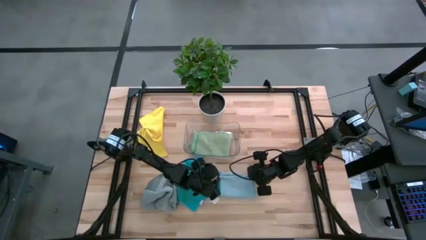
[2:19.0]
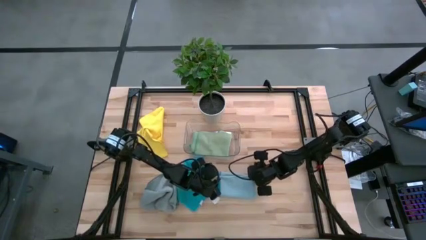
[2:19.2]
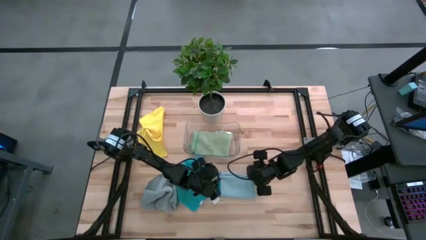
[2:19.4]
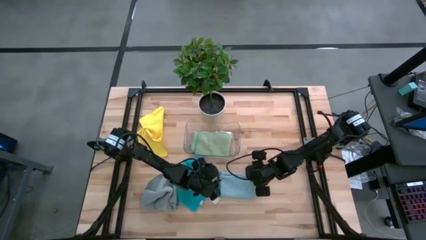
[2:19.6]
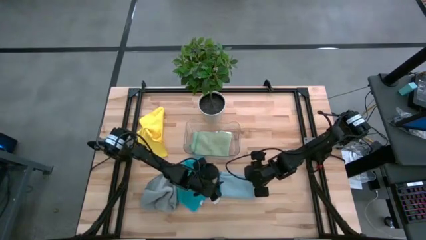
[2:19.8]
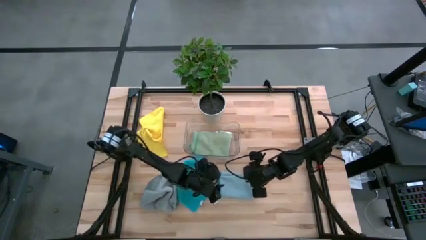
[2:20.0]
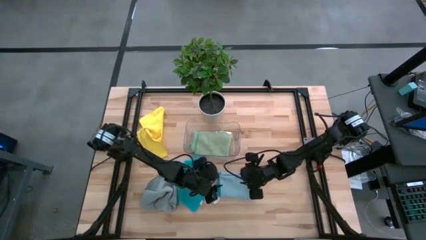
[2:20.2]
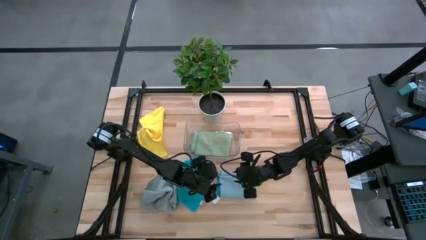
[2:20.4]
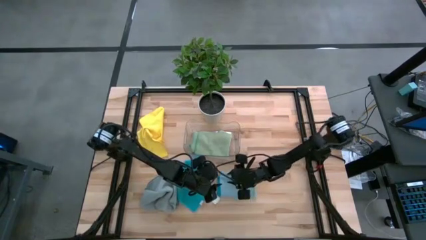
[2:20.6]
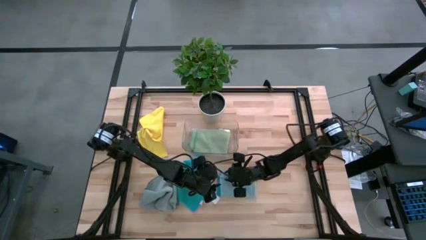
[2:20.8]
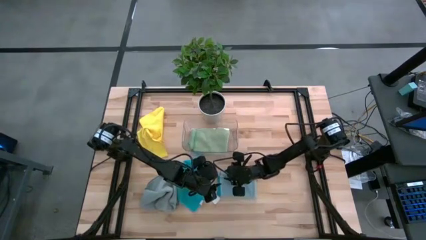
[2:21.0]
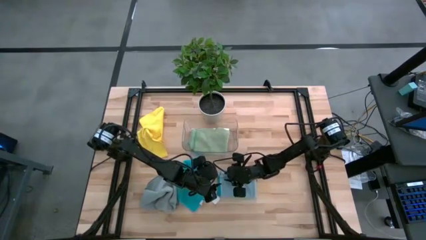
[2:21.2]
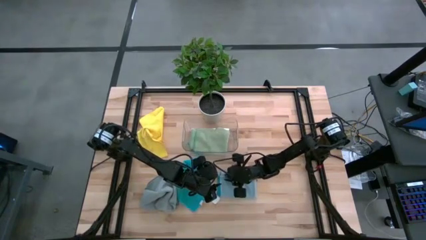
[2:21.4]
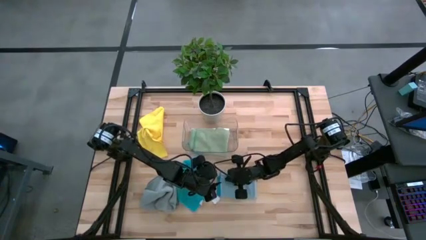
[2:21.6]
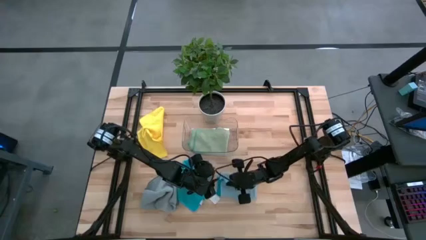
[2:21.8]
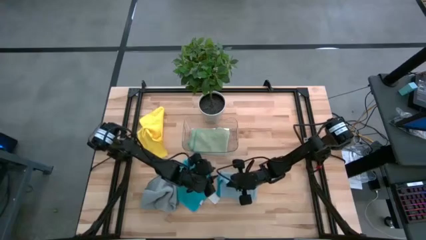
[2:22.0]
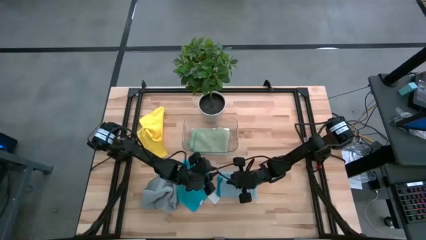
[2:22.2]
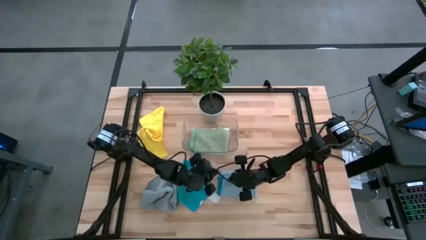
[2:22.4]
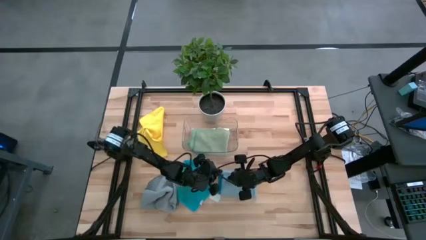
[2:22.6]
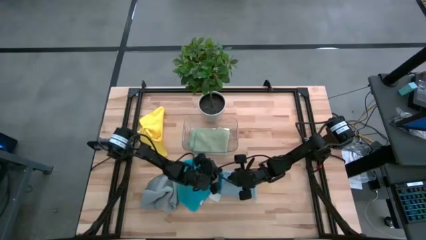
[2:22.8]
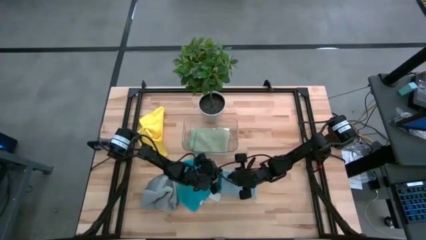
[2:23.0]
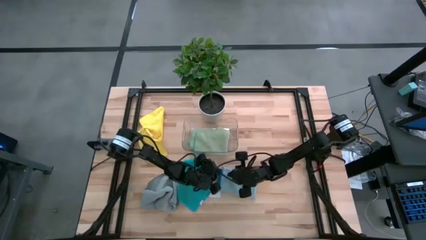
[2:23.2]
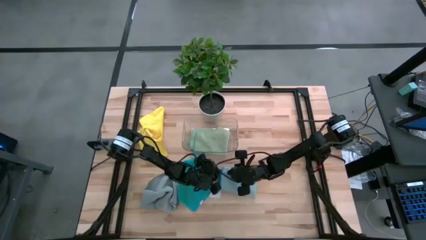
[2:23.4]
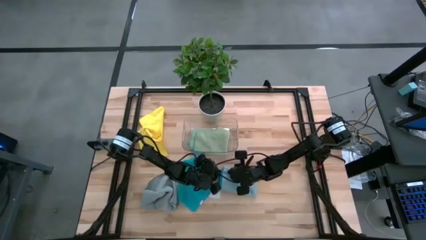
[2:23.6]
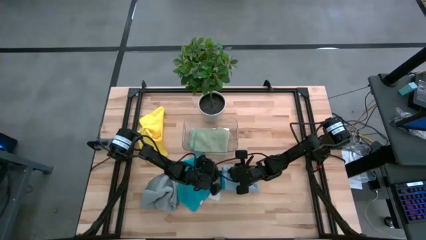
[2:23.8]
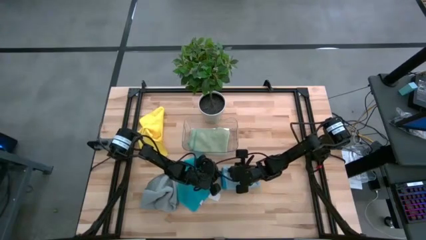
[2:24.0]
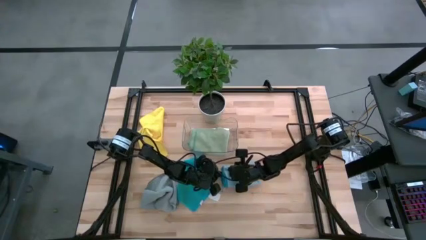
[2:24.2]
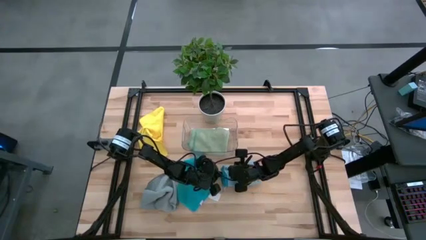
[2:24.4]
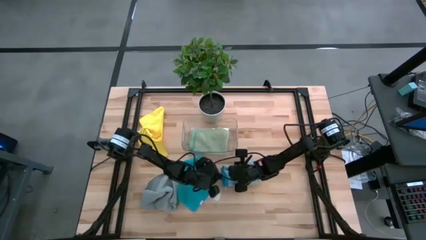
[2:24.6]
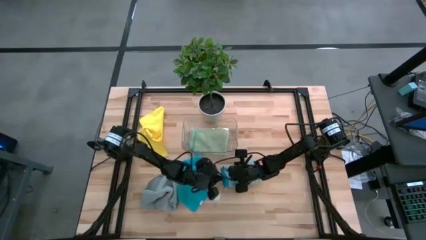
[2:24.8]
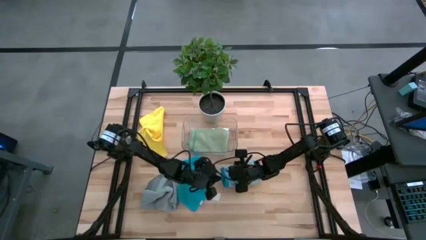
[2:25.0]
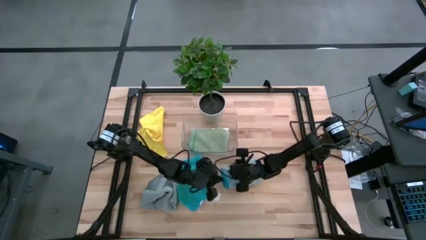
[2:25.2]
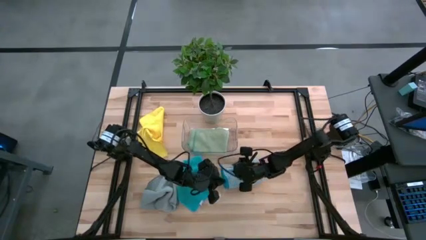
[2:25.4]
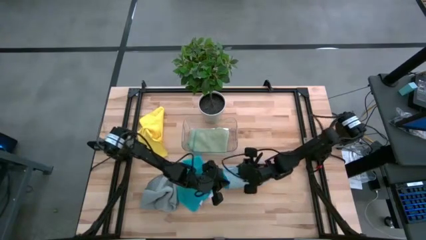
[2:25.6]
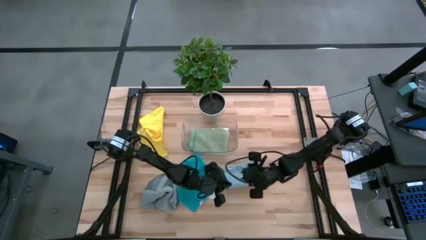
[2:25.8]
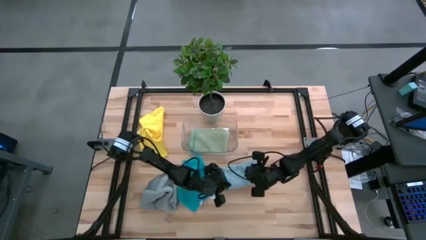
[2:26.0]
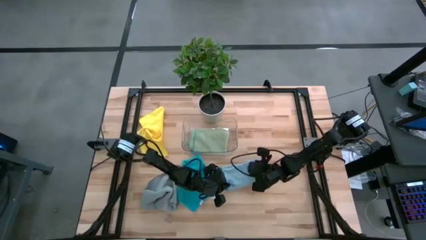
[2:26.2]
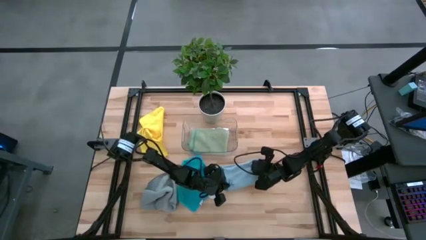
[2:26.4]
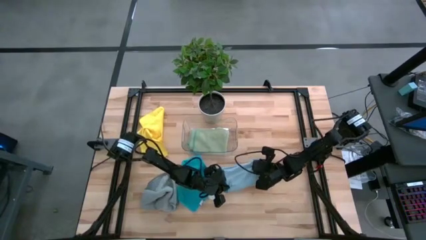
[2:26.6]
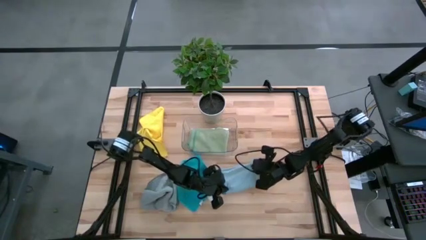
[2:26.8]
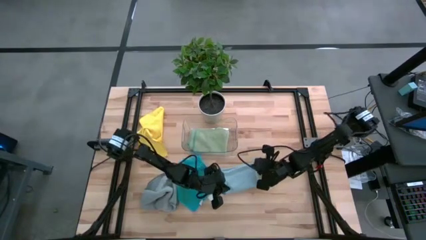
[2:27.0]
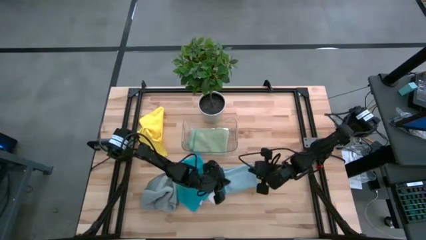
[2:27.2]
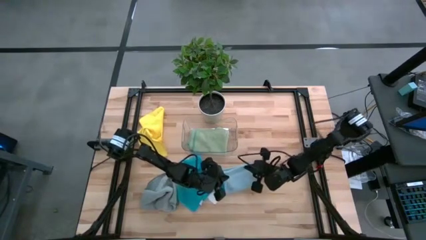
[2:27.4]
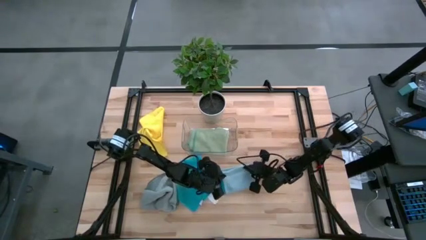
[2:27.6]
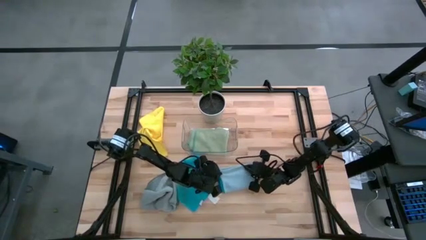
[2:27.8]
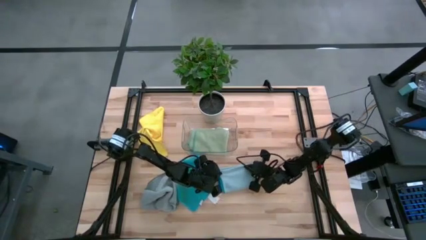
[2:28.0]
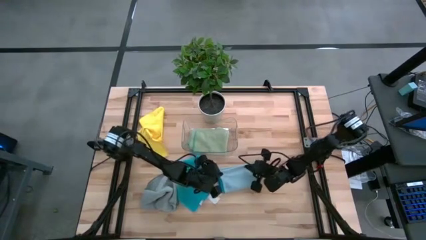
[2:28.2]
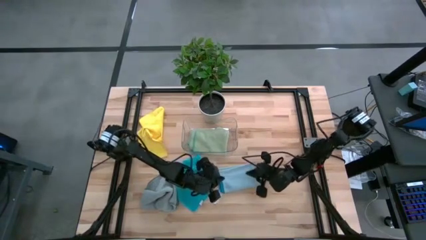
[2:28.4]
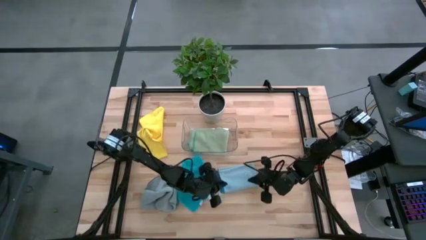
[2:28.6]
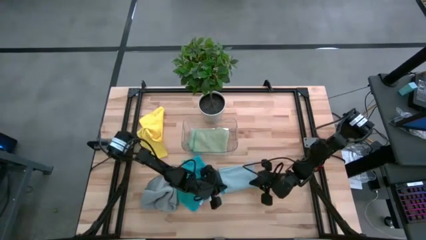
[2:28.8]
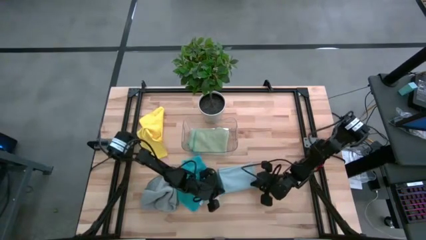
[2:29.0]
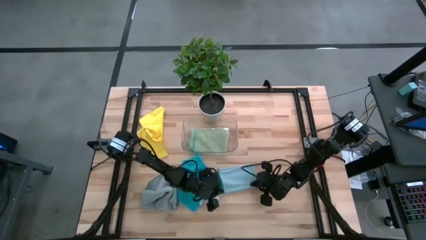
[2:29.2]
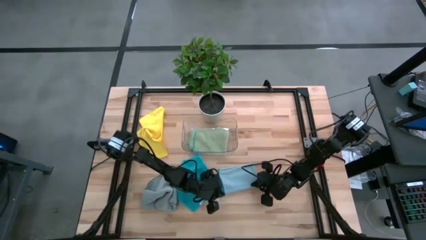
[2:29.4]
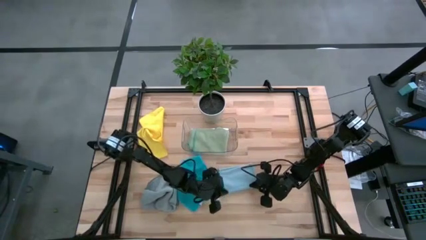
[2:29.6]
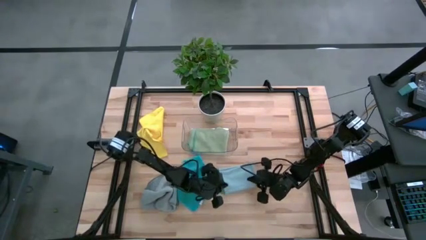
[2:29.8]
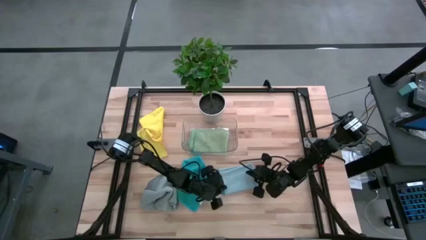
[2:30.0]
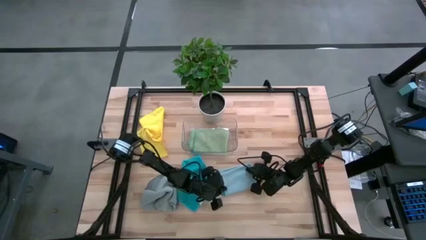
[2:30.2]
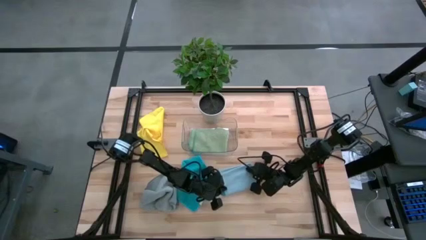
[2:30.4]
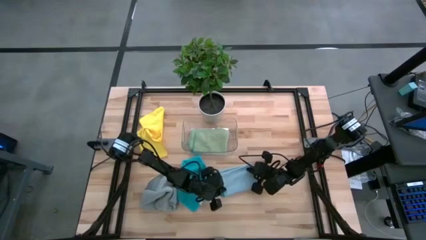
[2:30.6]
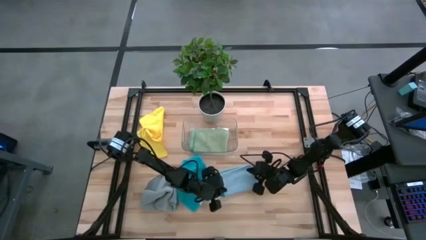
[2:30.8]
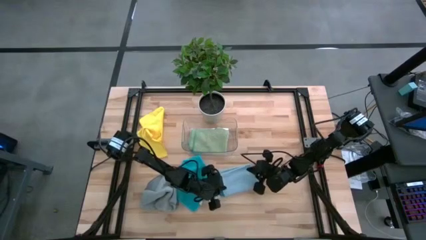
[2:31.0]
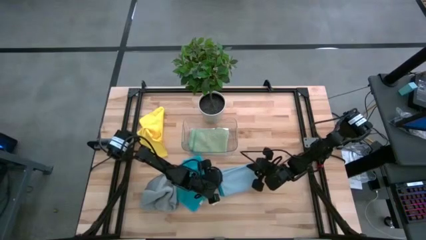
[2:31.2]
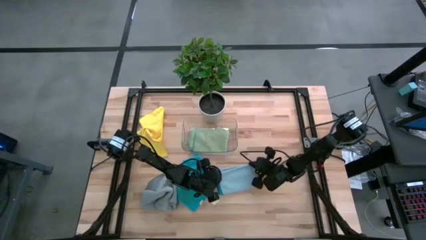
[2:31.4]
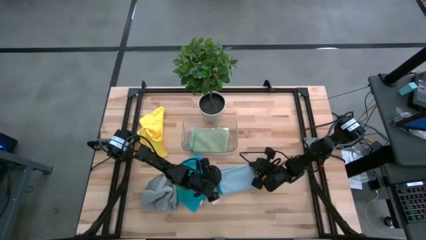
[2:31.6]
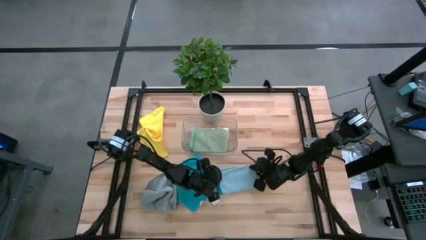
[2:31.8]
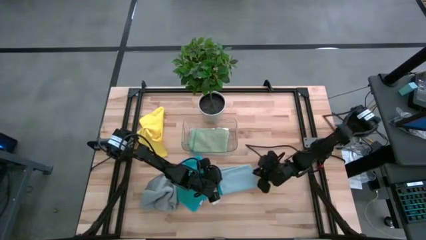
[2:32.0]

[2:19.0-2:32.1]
Task: Fold microfiber towels
Fold the light blue microfiber cloth
